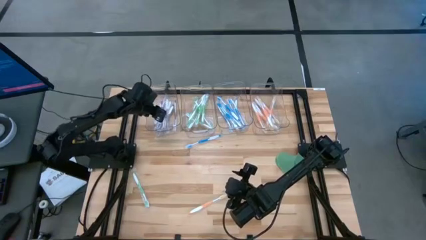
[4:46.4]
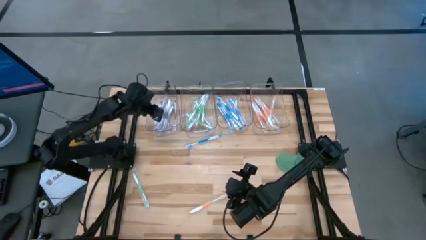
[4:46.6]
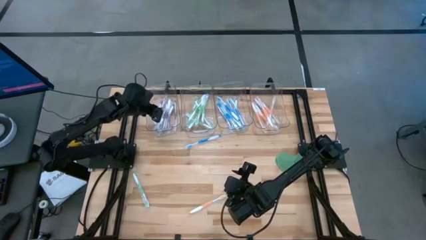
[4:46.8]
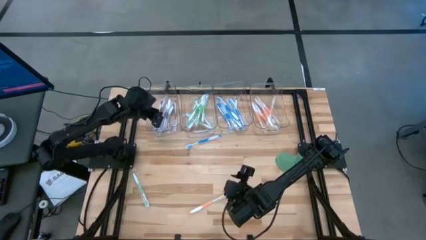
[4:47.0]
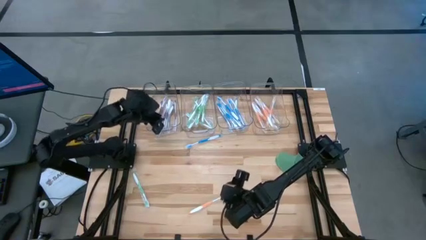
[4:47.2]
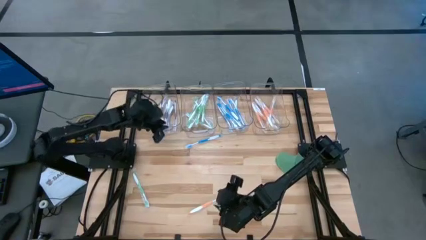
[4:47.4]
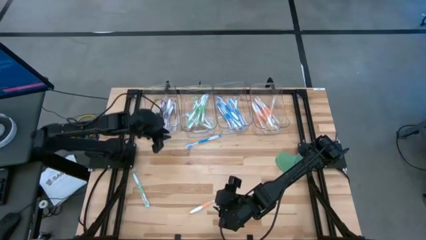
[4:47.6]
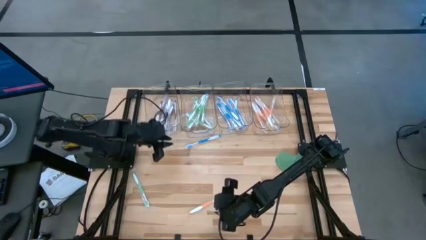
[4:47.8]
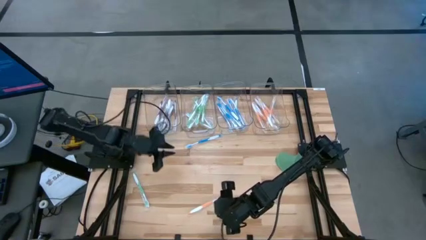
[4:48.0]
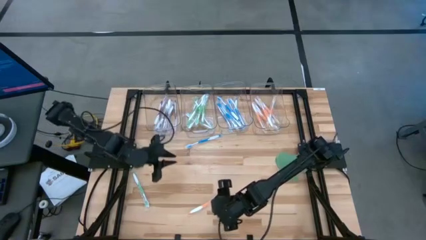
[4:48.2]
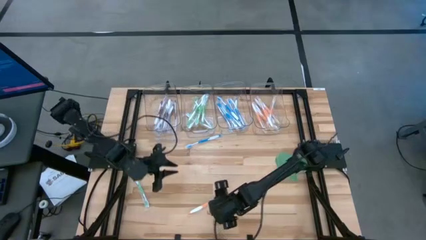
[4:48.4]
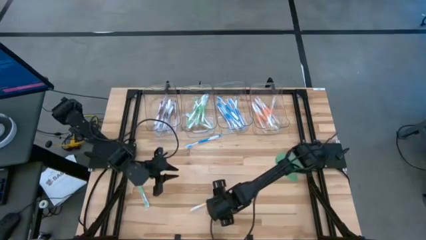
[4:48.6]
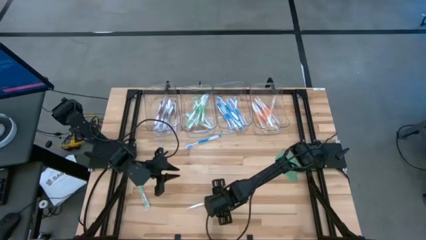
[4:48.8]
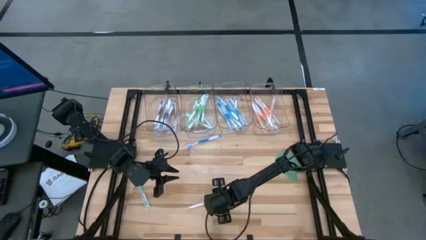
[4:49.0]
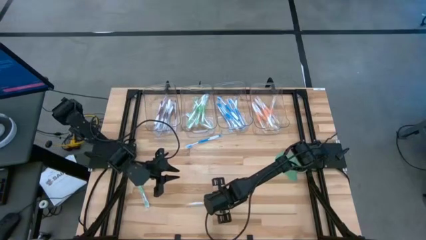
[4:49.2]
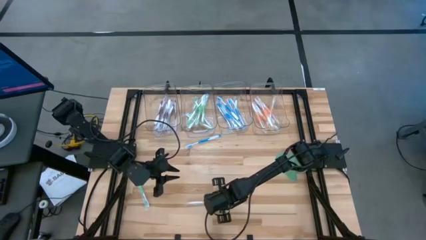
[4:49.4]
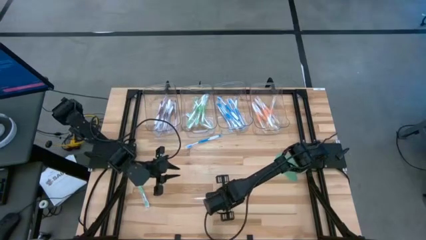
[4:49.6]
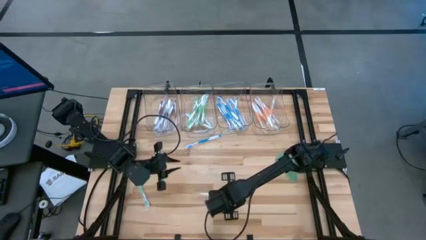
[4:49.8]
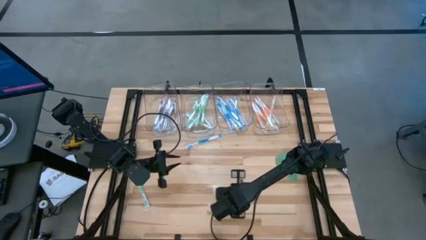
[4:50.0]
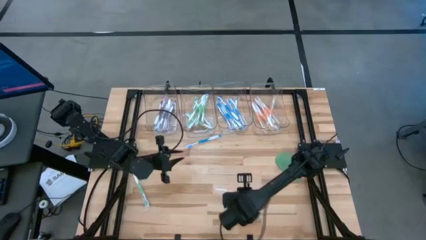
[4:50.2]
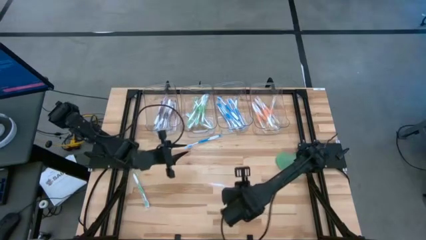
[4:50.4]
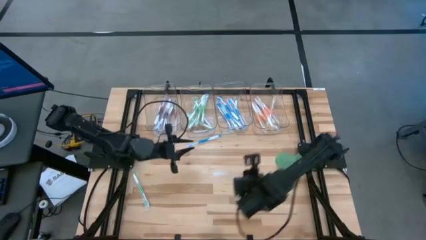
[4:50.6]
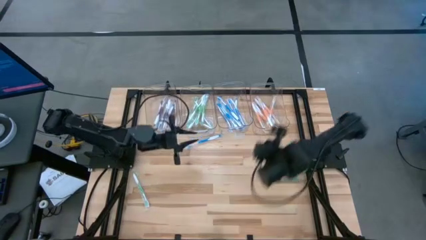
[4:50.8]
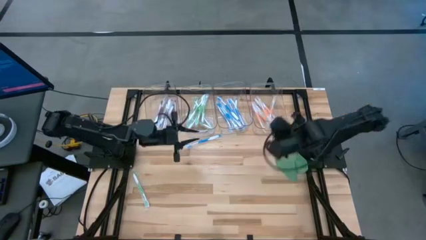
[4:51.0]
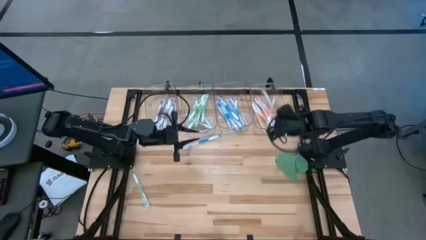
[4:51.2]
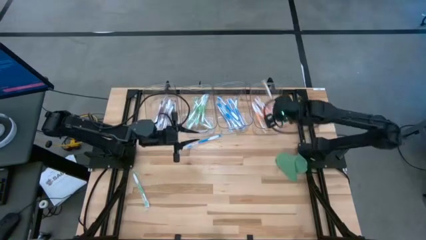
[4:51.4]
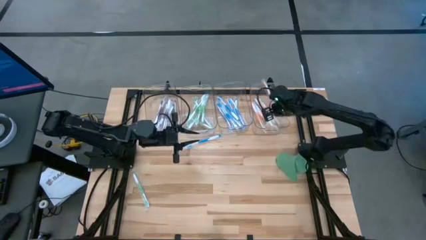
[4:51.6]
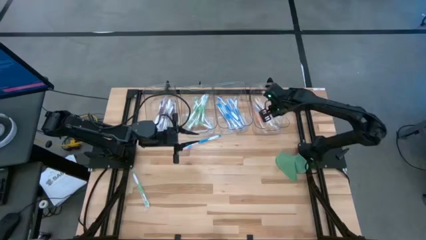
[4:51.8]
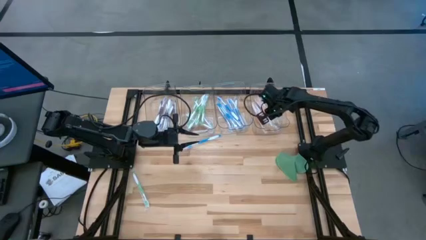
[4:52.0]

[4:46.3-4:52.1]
Task: Pick & Place Toothbrushes
Put the orange toothbrush into the right transparent bin

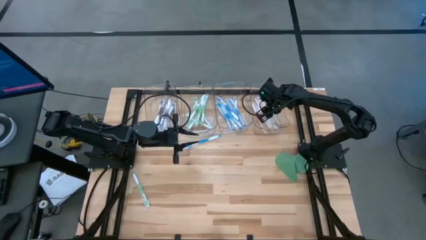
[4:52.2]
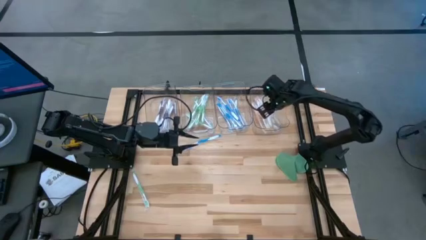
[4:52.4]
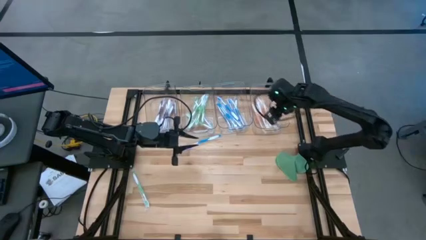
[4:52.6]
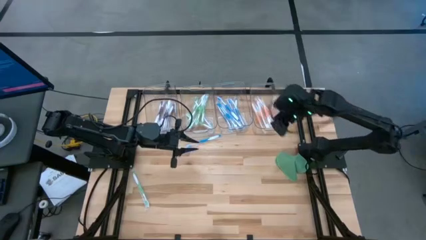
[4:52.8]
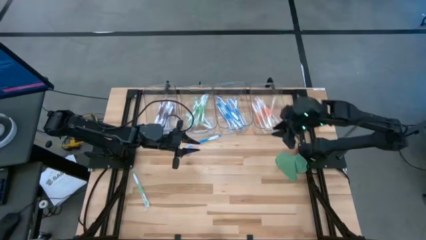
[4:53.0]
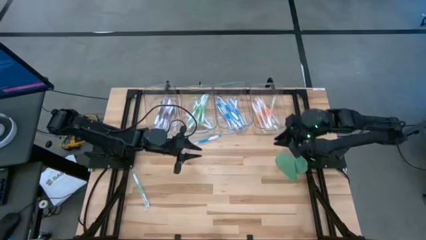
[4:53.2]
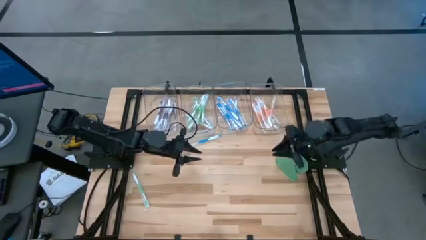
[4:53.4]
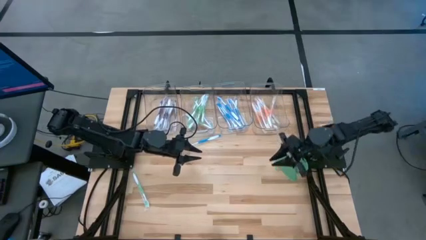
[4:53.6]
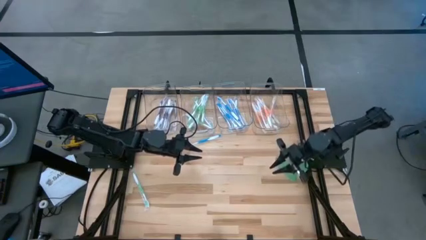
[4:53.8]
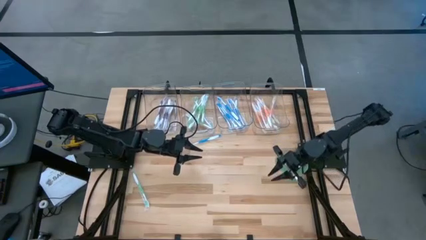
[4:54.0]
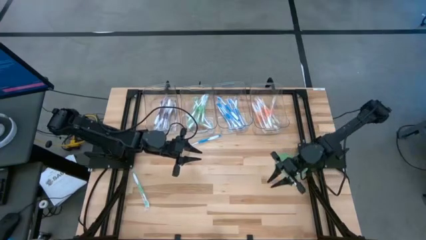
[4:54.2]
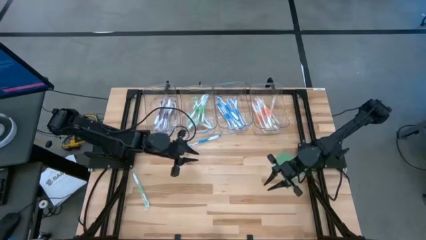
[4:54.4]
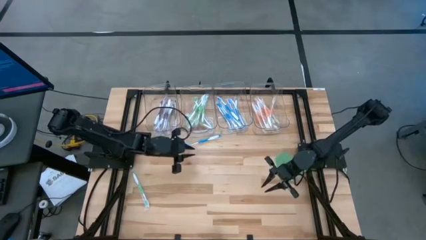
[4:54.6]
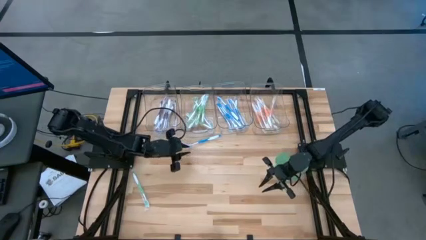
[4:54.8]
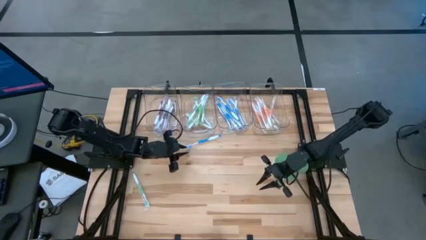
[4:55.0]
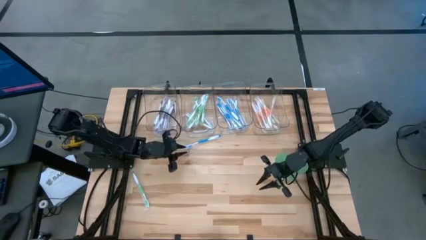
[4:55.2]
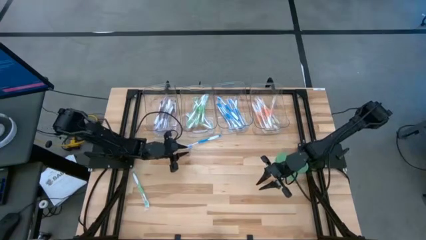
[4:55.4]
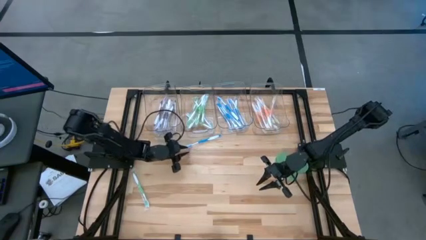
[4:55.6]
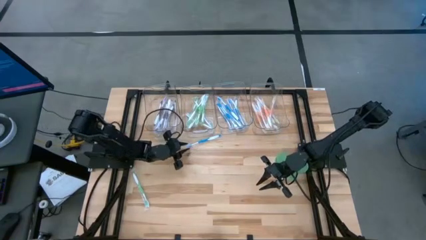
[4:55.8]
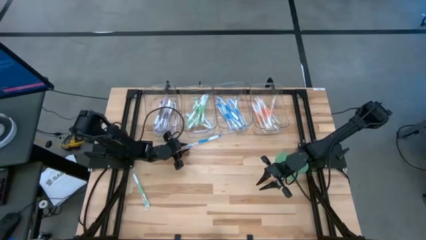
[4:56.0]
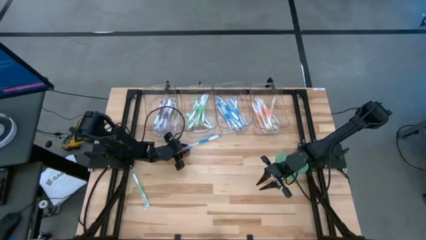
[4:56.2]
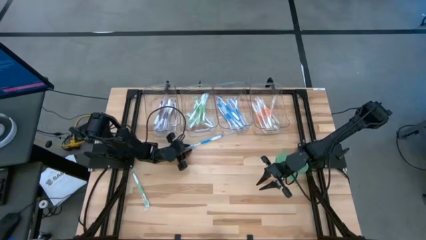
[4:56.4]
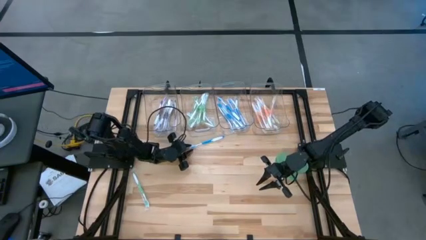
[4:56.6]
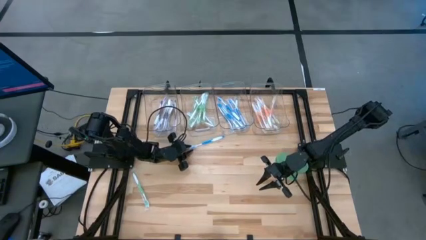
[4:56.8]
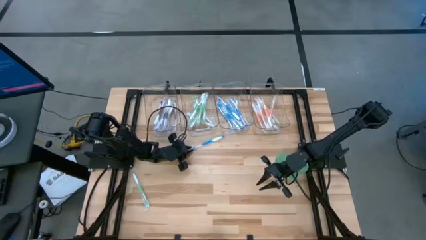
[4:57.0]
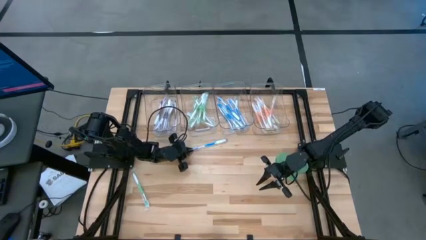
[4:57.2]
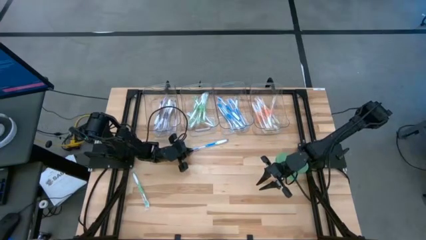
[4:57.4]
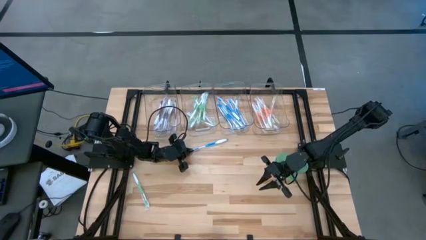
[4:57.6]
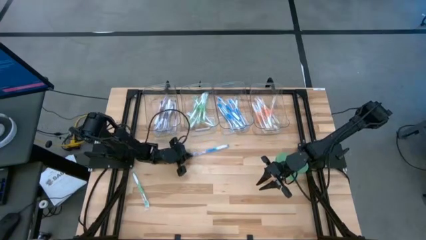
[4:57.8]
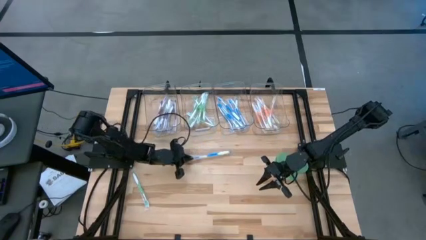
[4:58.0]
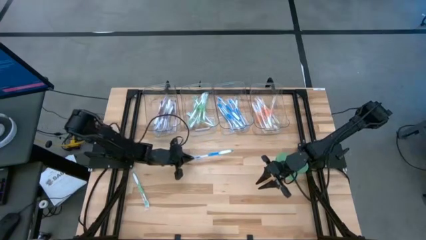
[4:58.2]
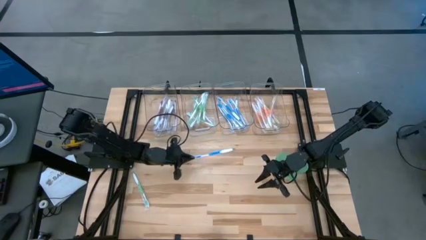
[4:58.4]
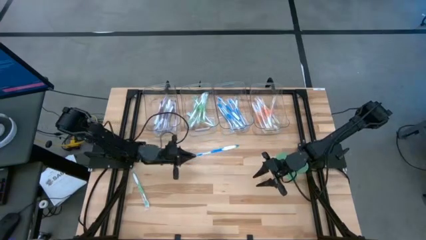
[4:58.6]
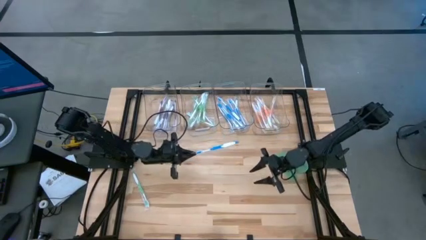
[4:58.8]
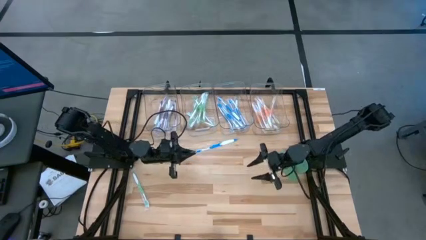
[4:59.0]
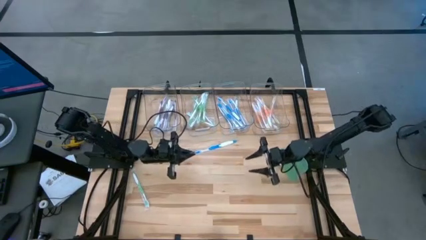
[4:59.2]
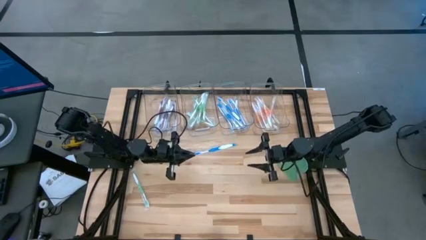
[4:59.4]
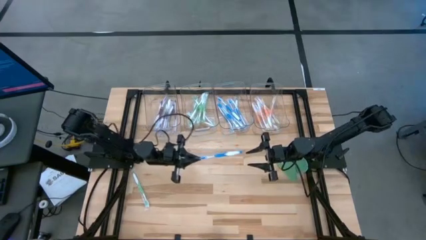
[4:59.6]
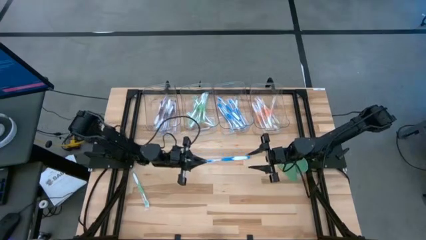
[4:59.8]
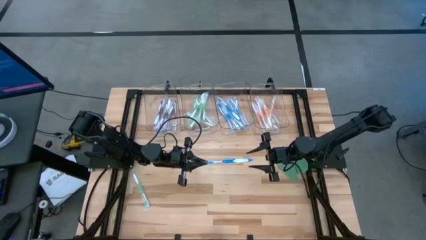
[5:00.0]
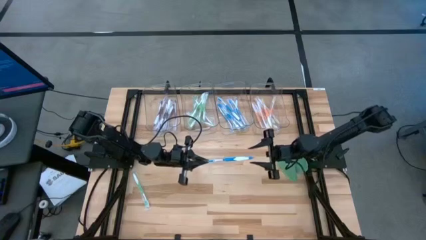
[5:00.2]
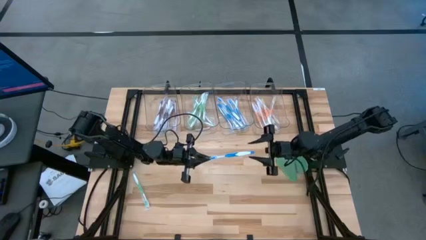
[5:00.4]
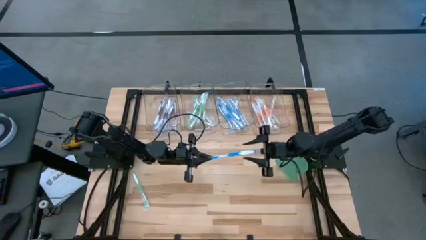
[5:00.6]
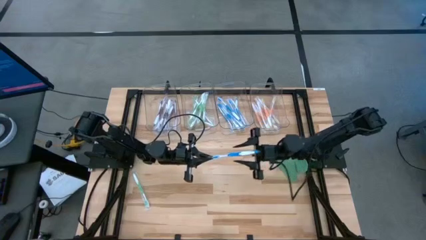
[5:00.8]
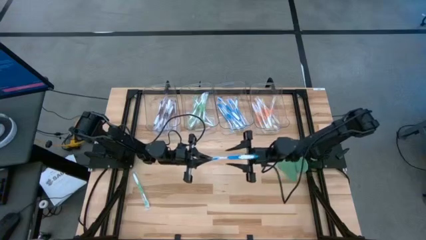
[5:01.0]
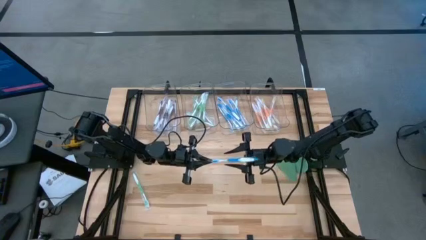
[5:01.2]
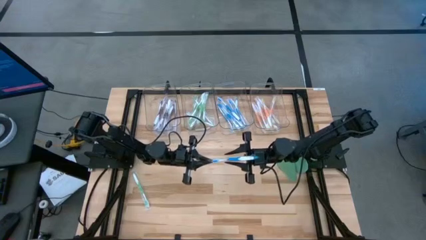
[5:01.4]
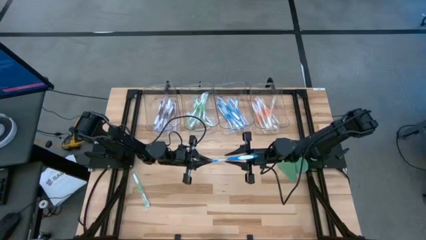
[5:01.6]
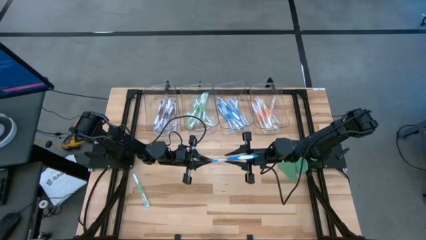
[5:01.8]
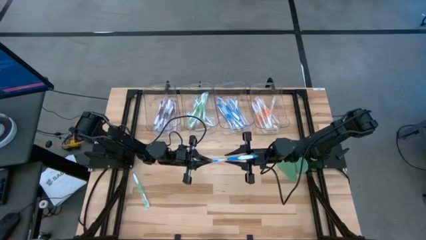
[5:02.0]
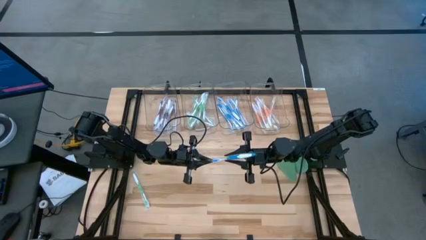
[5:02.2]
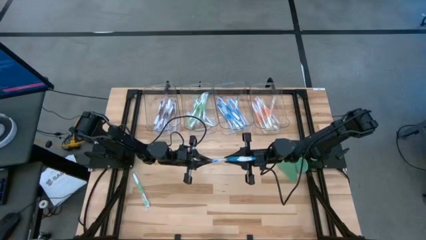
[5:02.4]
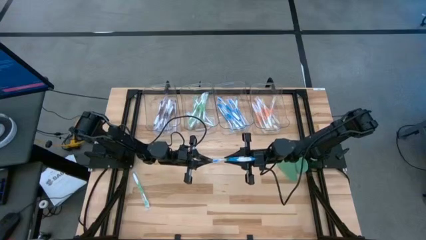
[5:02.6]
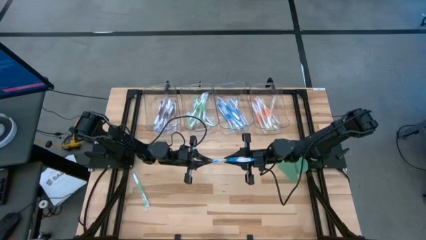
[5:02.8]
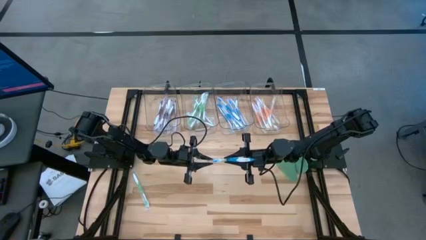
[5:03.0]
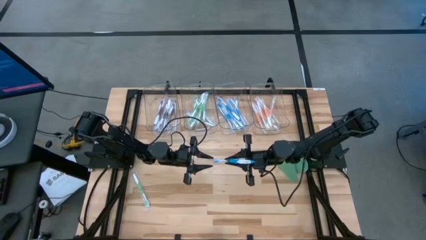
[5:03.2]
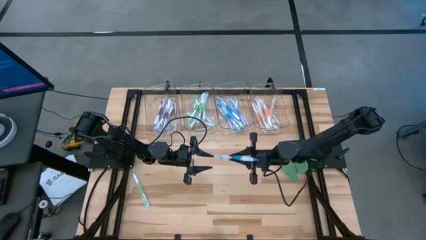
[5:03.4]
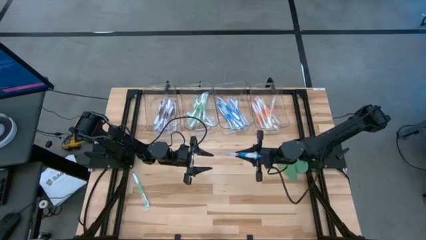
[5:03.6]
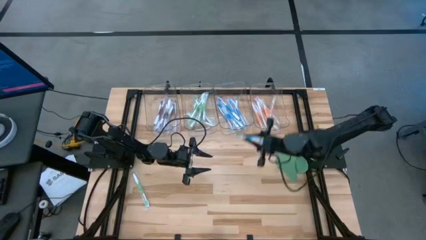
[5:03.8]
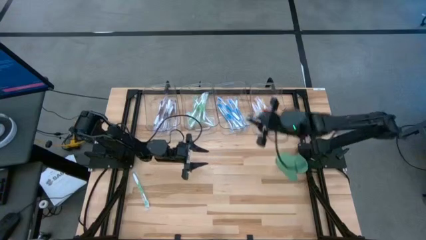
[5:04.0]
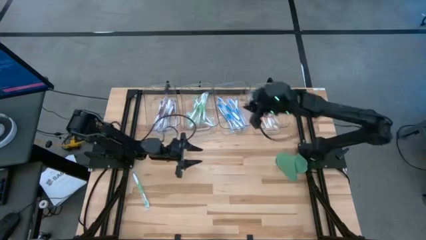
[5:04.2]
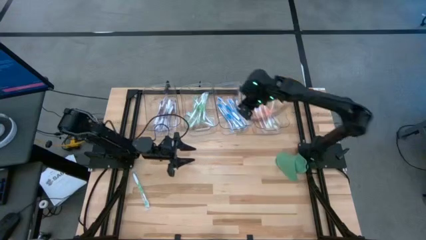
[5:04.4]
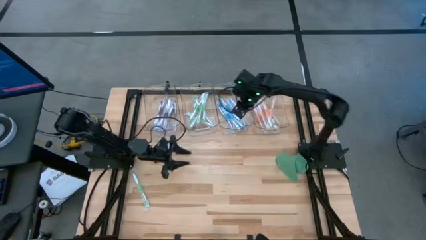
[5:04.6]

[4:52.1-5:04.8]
Put the blue toothbrush into the middle right transparent bin
